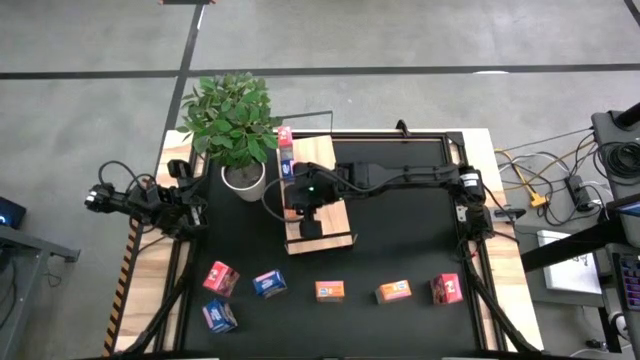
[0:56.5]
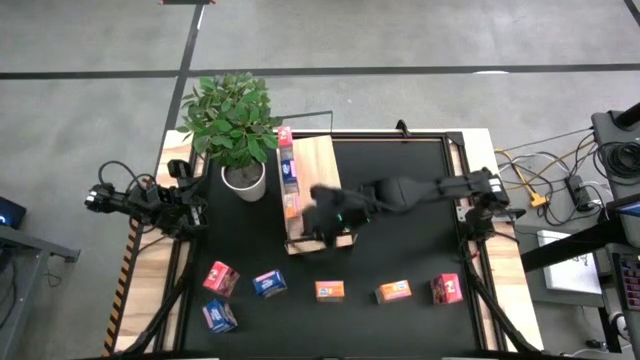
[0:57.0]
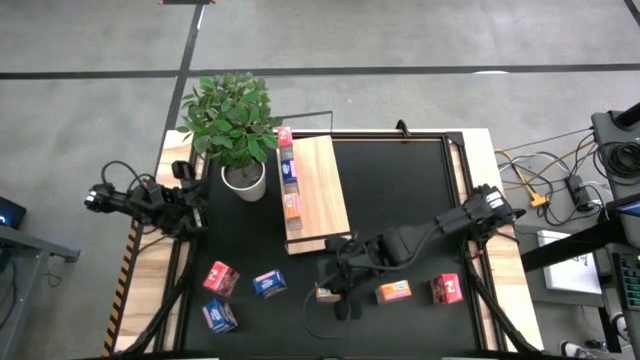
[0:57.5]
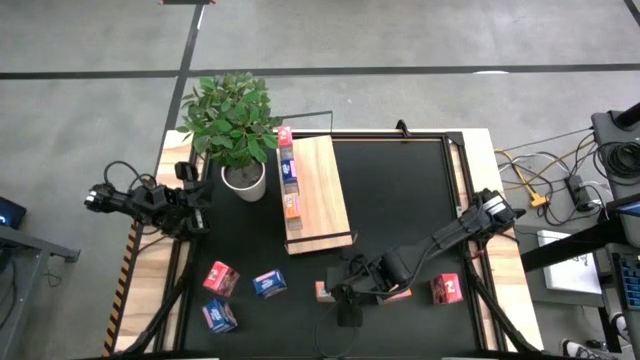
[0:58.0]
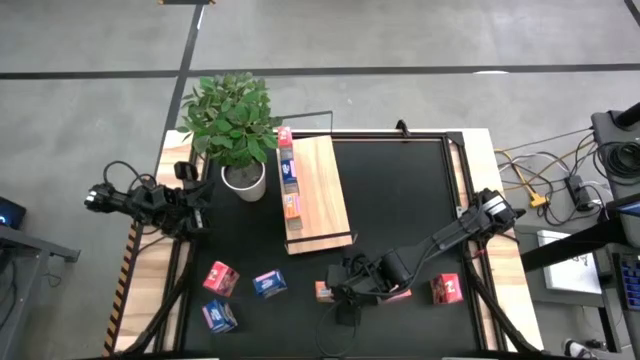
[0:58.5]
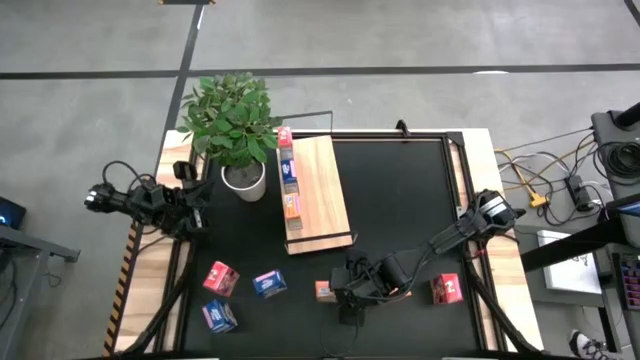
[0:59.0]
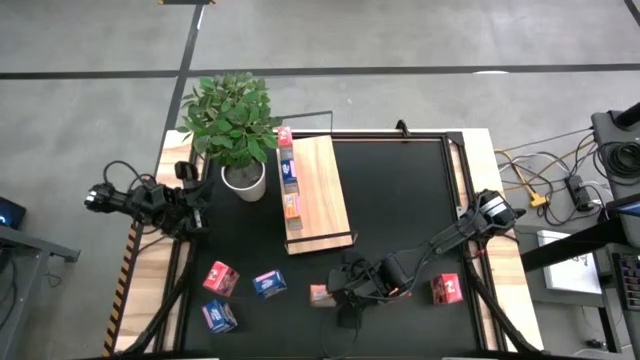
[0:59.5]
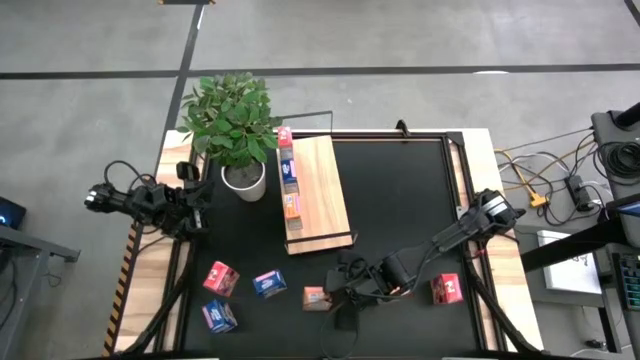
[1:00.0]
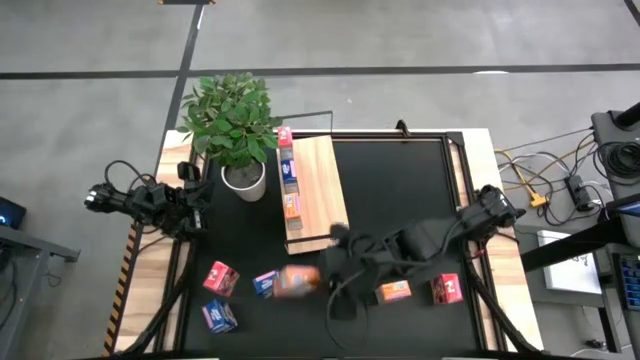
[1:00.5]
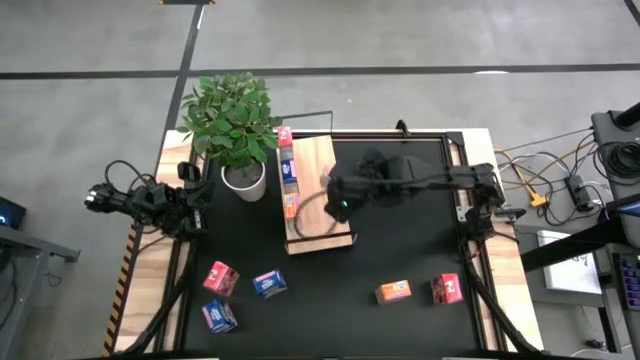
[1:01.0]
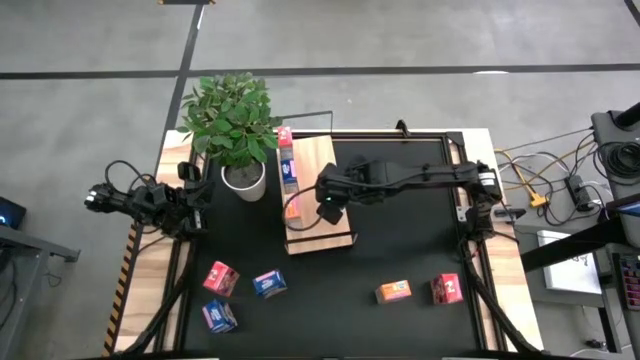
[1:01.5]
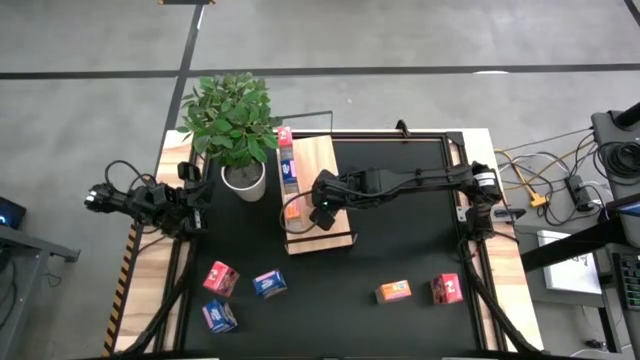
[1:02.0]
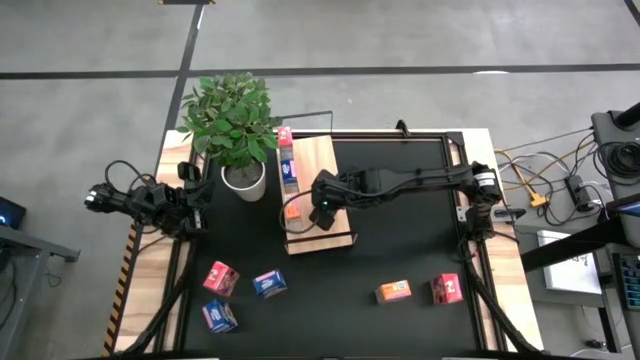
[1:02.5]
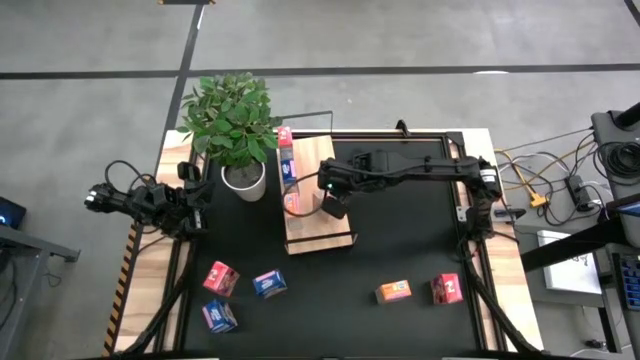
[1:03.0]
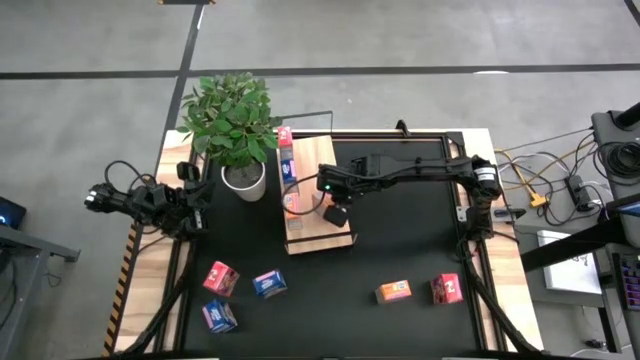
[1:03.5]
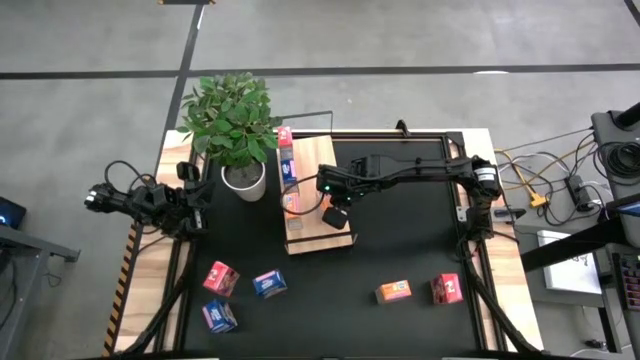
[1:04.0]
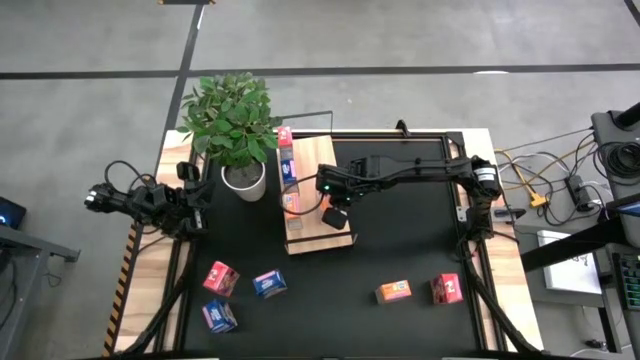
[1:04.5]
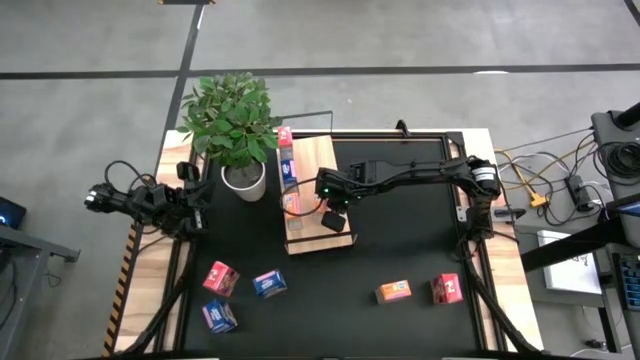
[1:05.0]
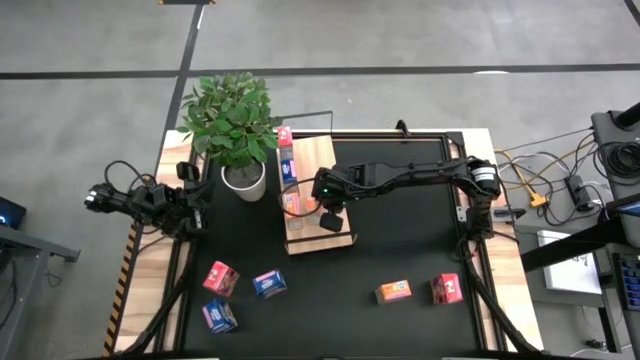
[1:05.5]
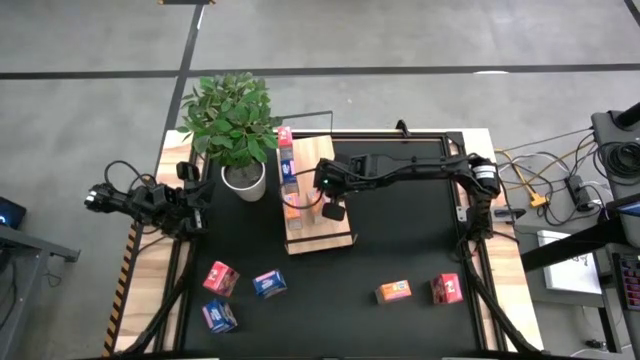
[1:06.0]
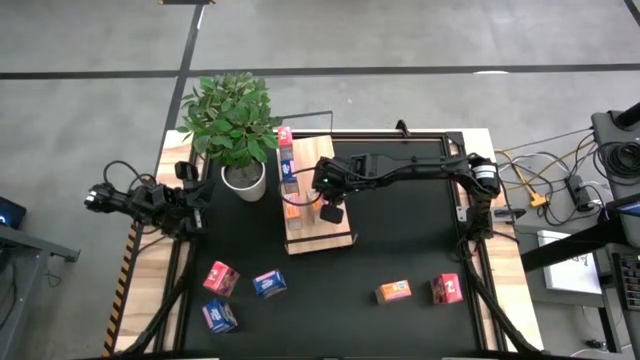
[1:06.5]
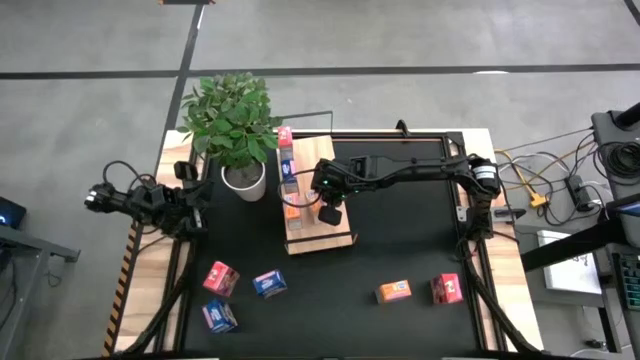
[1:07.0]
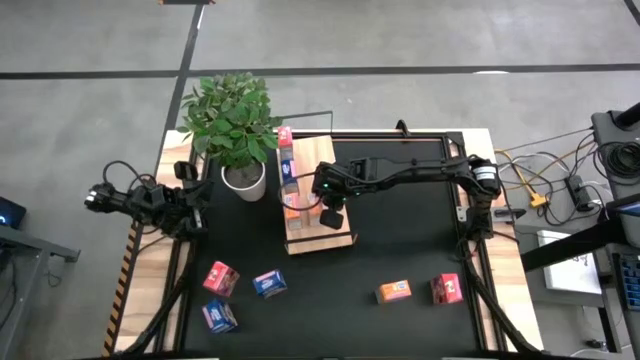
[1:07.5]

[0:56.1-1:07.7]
Task: Stack cereal on shelf
Put the left orange cereal box on the shelf aligned with the other orange cereal box

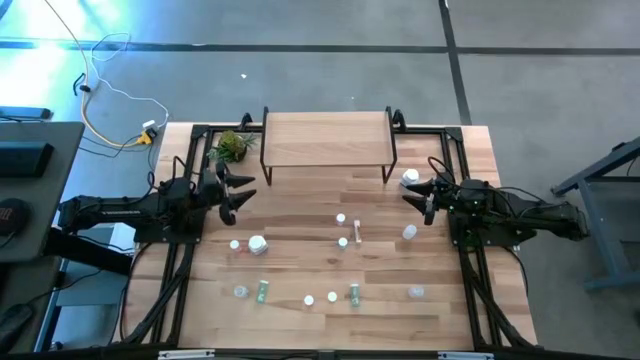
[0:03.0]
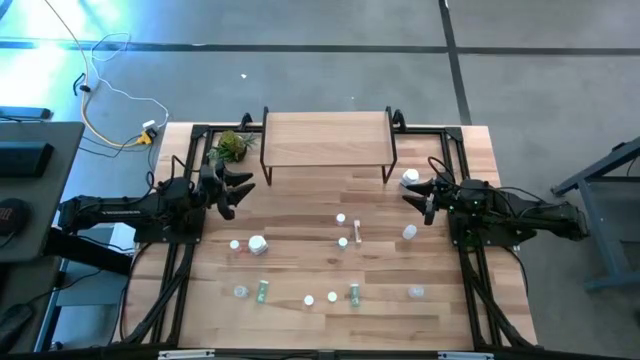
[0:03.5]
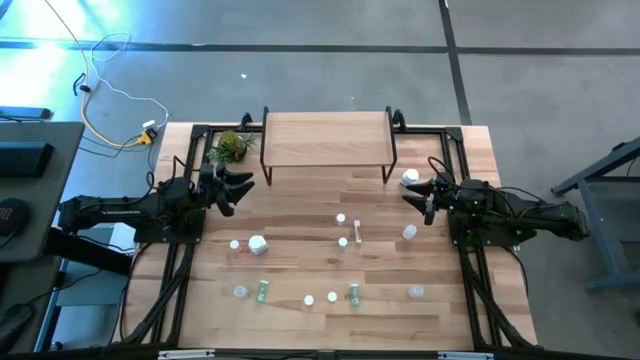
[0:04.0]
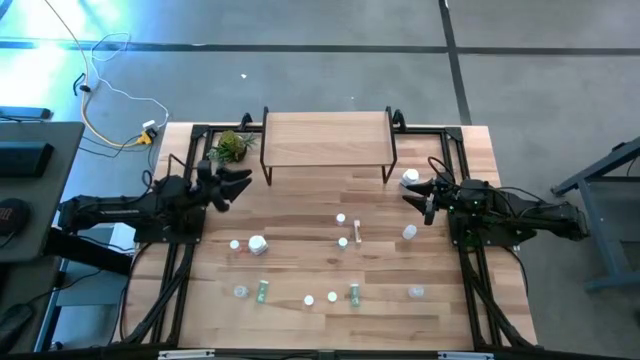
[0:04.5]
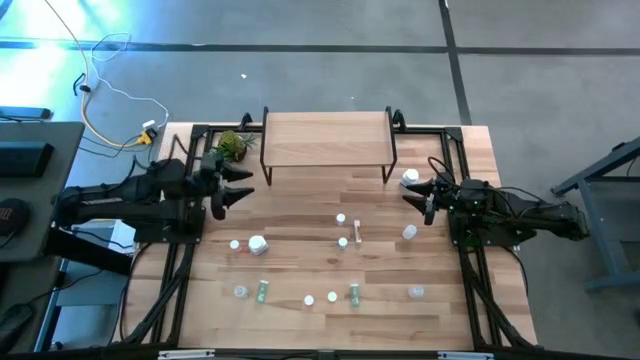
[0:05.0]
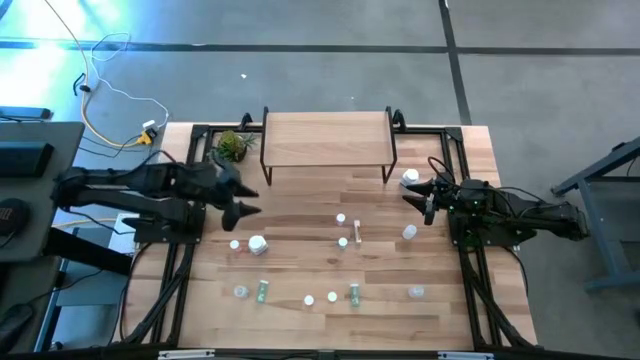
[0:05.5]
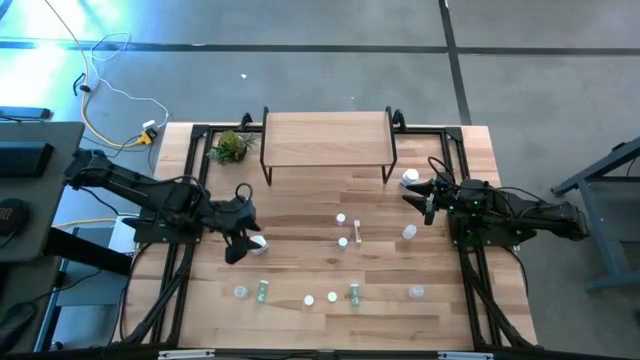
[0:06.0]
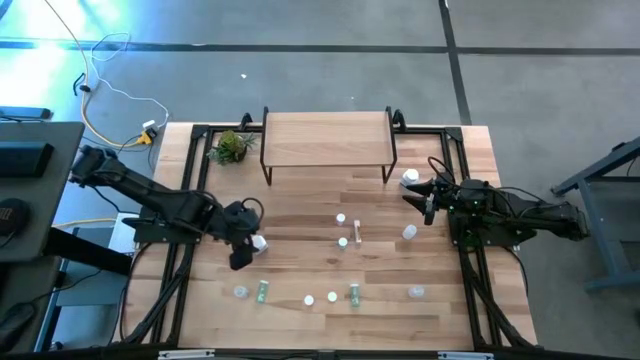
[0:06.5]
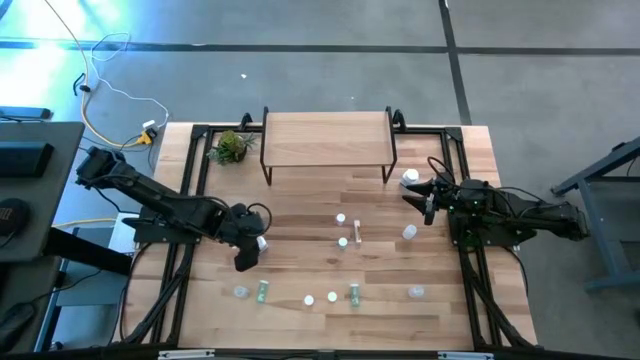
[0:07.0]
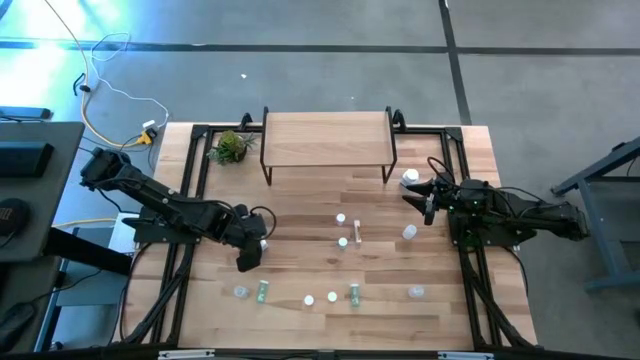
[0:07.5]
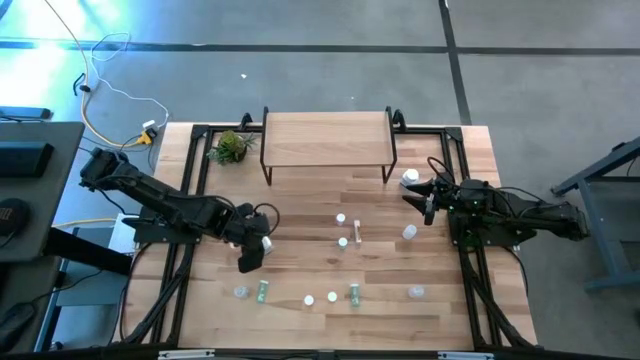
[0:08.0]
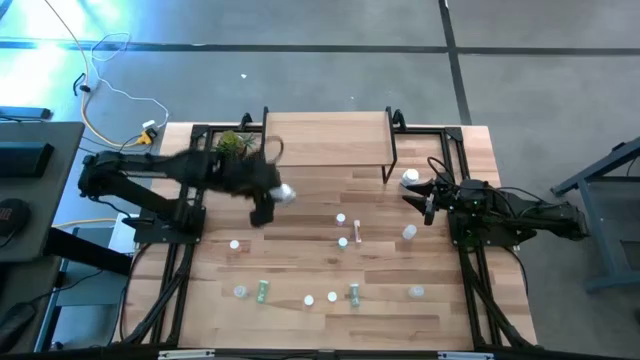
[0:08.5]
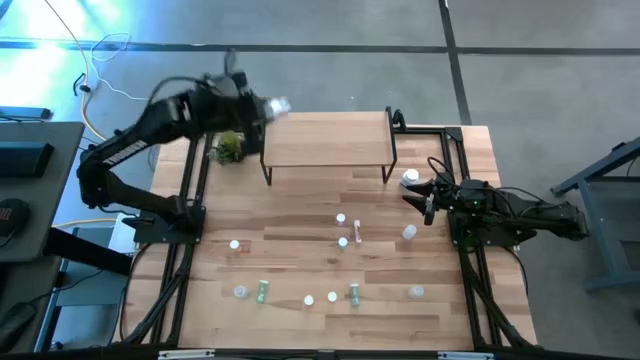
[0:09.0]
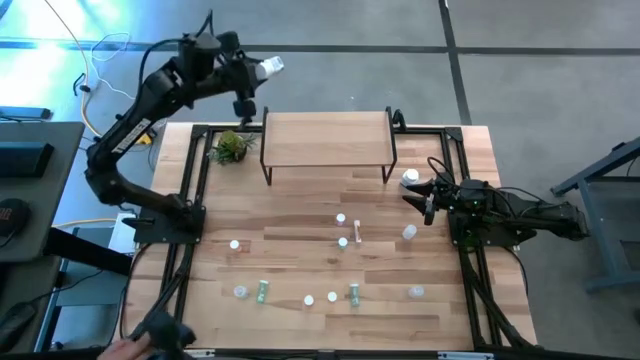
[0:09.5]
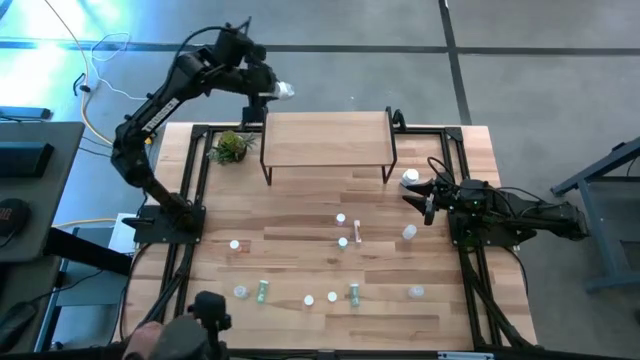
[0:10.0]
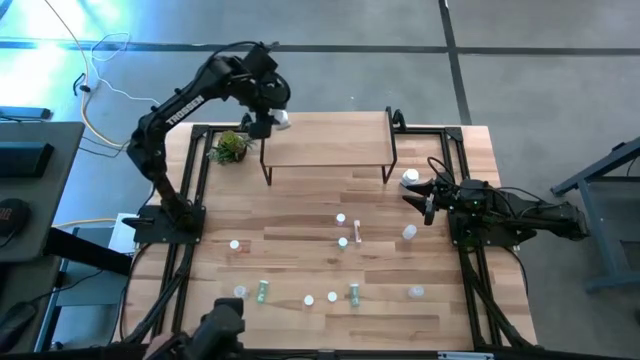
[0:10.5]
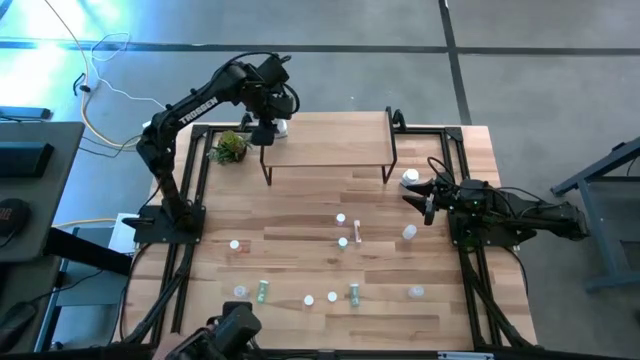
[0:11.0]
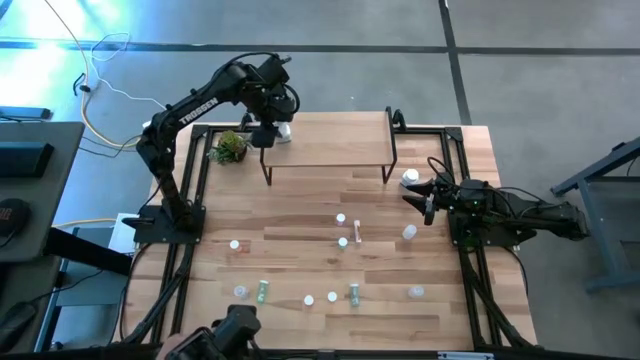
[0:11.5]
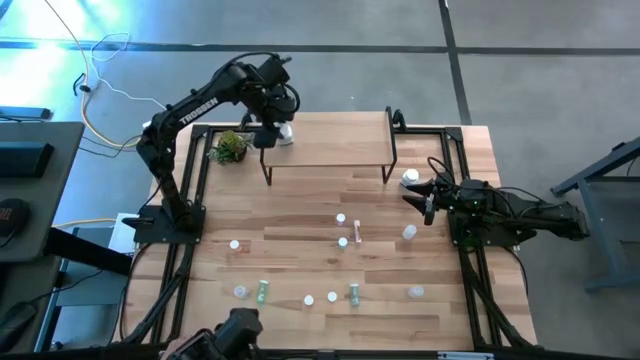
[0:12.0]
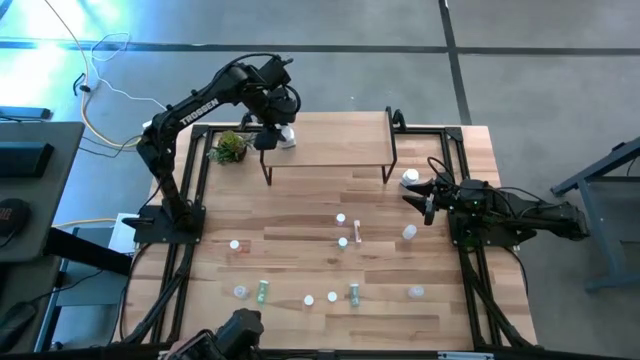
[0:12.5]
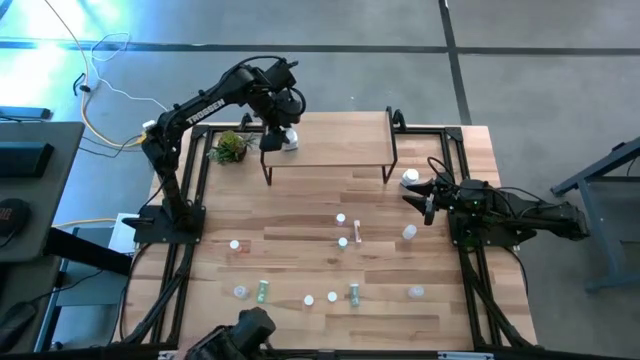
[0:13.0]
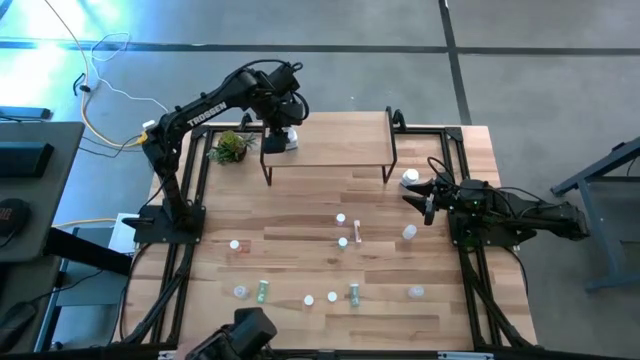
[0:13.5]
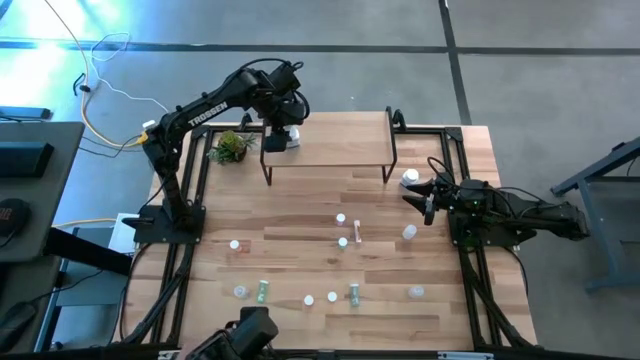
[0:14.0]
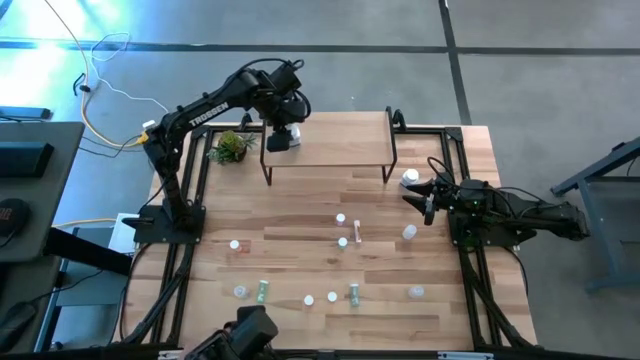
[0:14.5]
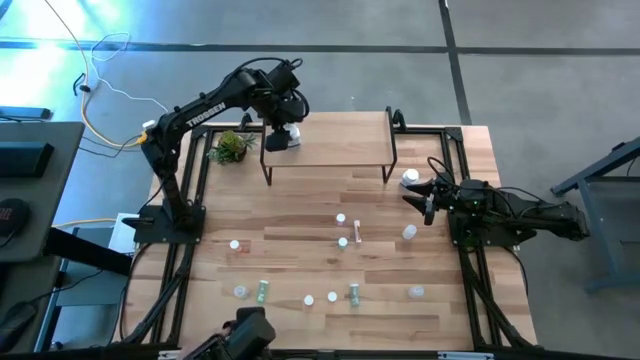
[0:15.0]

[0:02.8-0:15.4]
Task: Pick and place medicine bottles onto shelf by color
Put the left white blue pill bottle on the shelf
